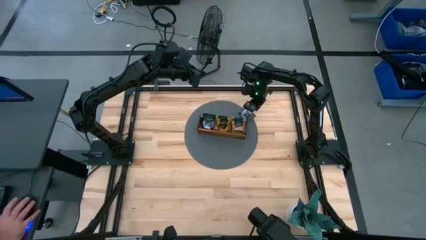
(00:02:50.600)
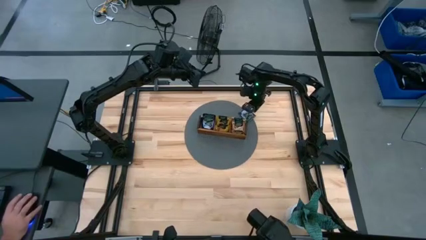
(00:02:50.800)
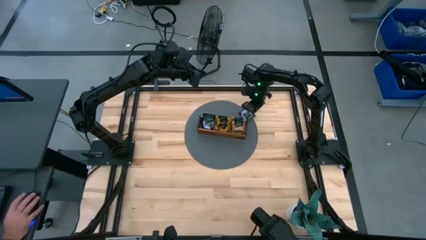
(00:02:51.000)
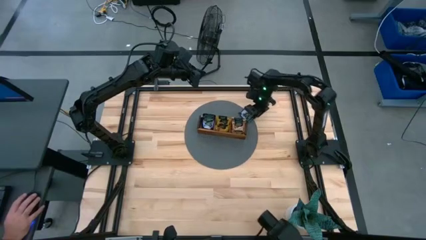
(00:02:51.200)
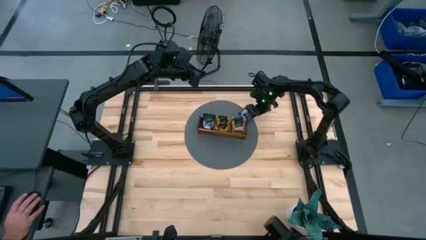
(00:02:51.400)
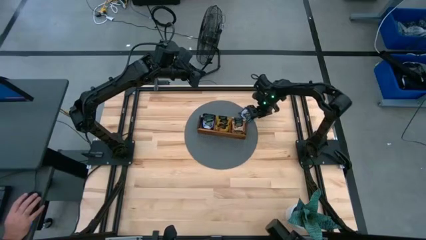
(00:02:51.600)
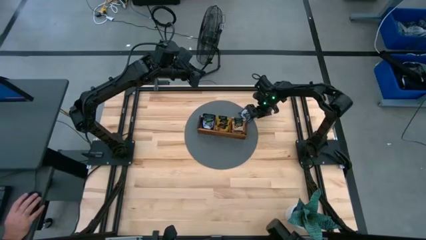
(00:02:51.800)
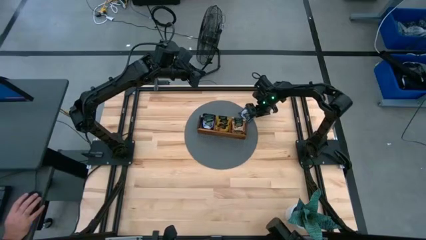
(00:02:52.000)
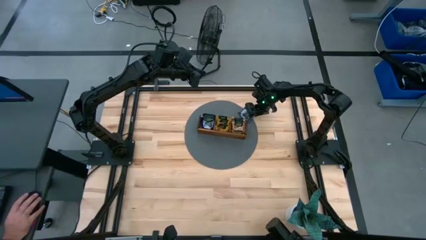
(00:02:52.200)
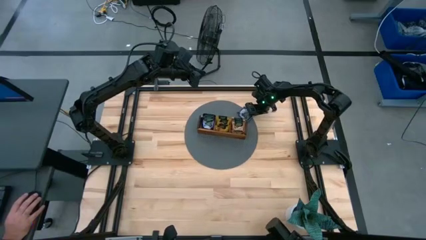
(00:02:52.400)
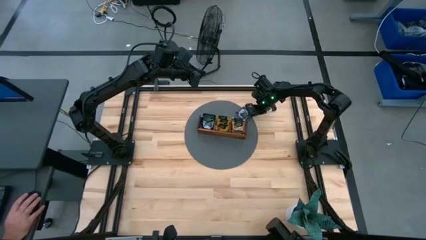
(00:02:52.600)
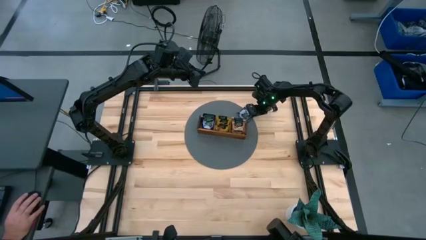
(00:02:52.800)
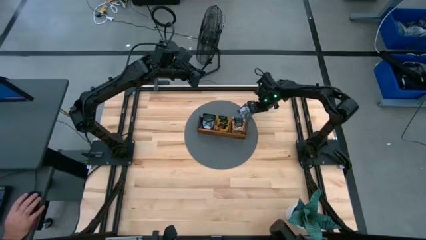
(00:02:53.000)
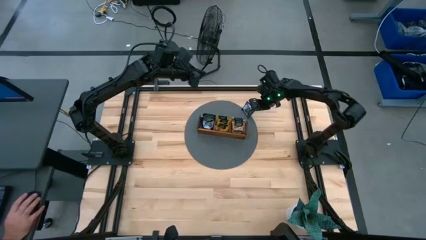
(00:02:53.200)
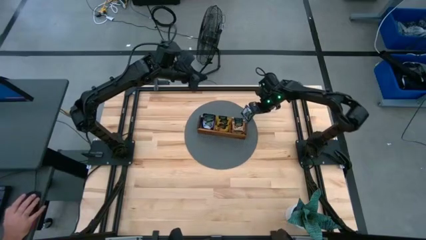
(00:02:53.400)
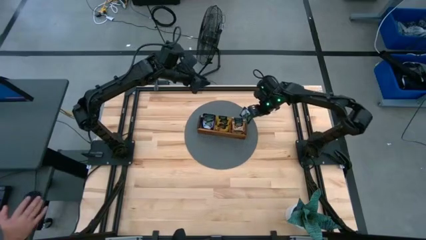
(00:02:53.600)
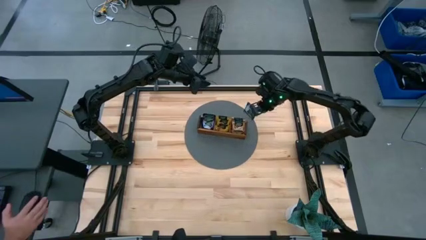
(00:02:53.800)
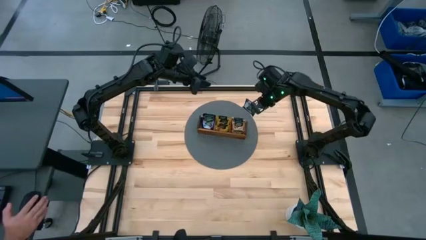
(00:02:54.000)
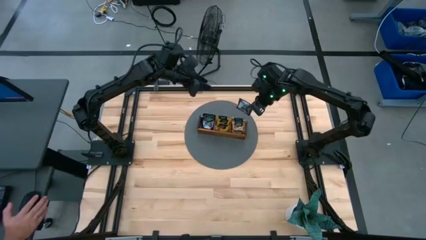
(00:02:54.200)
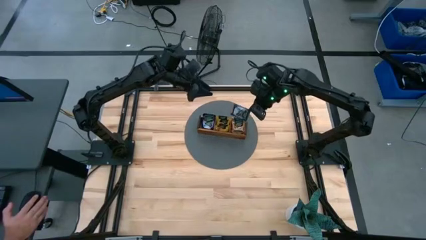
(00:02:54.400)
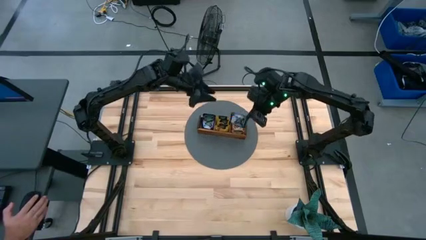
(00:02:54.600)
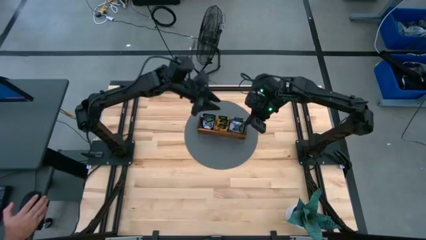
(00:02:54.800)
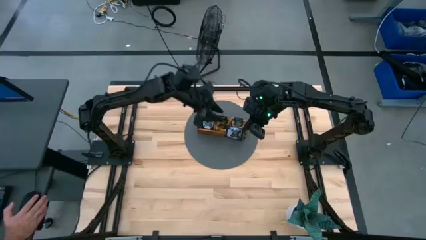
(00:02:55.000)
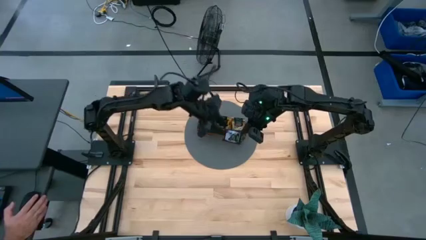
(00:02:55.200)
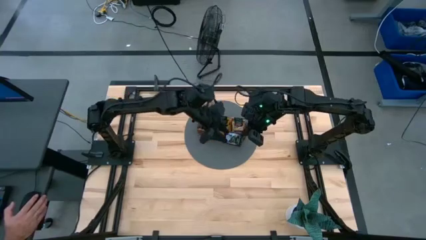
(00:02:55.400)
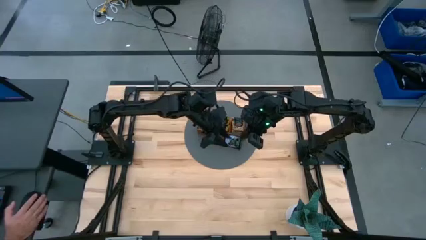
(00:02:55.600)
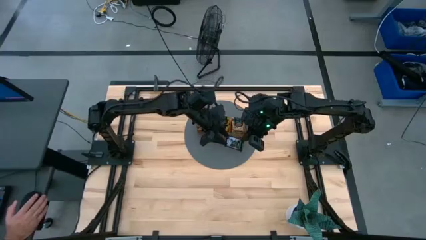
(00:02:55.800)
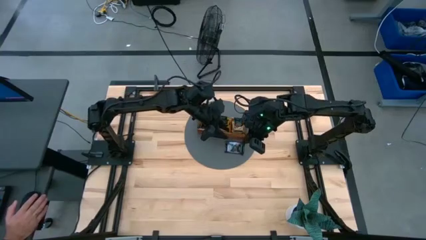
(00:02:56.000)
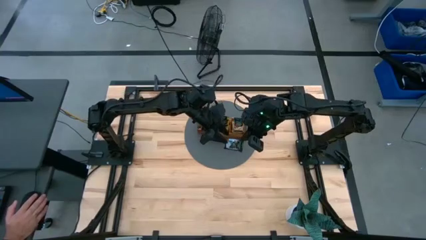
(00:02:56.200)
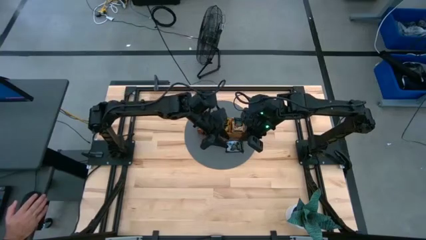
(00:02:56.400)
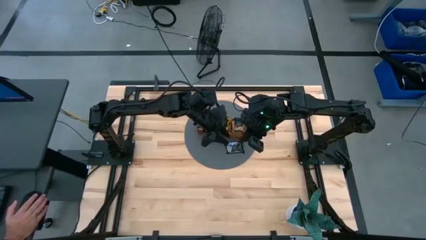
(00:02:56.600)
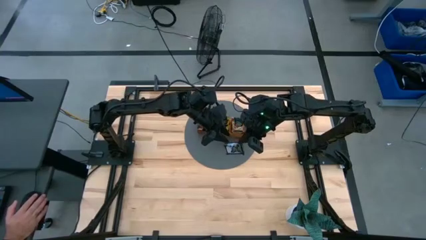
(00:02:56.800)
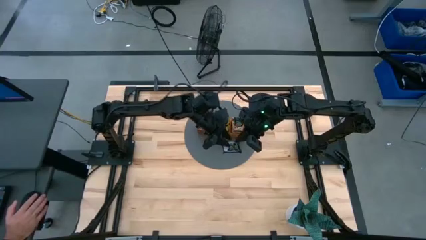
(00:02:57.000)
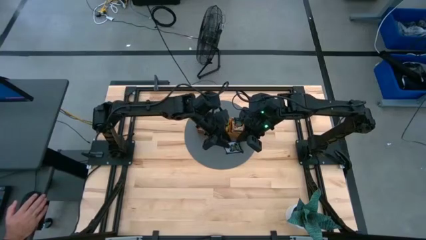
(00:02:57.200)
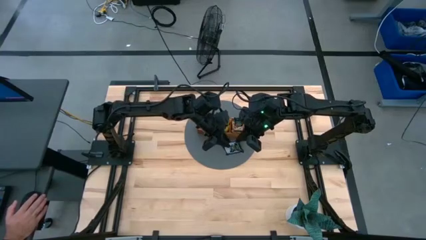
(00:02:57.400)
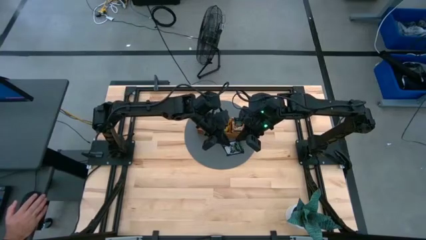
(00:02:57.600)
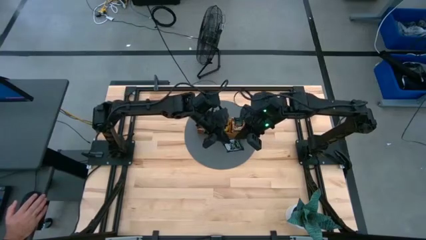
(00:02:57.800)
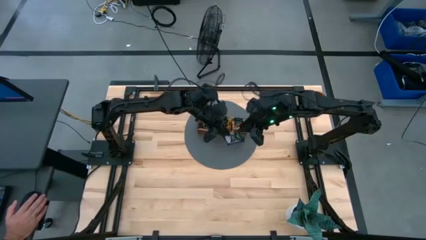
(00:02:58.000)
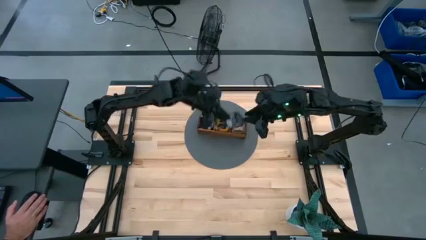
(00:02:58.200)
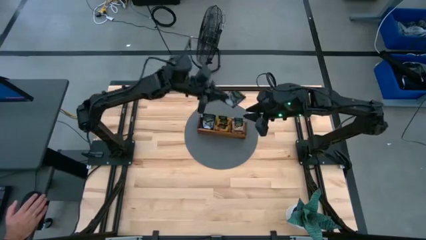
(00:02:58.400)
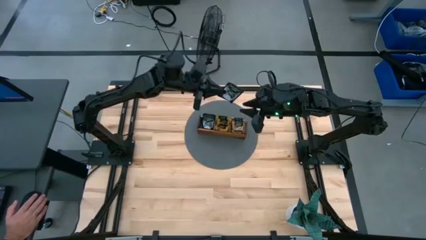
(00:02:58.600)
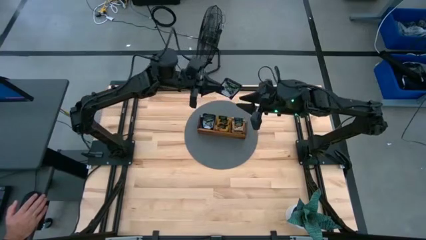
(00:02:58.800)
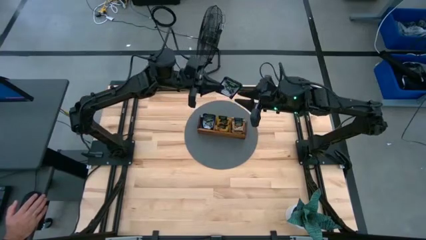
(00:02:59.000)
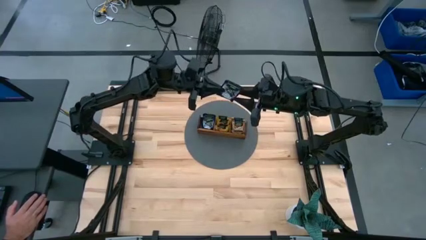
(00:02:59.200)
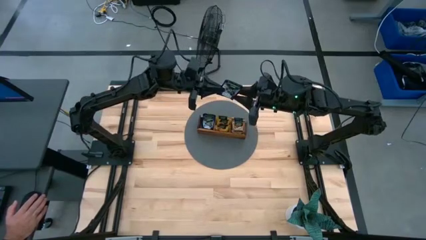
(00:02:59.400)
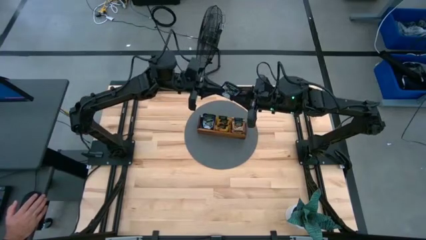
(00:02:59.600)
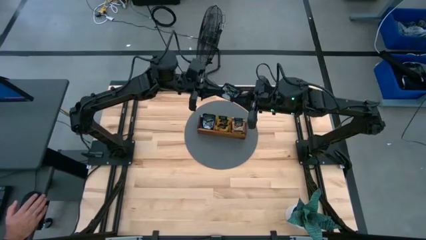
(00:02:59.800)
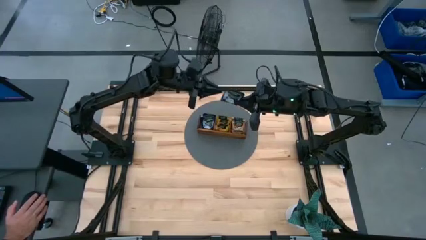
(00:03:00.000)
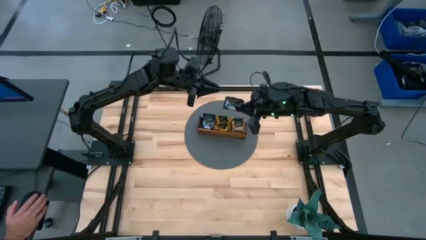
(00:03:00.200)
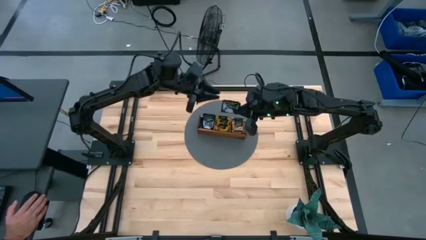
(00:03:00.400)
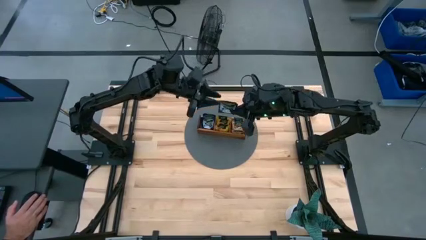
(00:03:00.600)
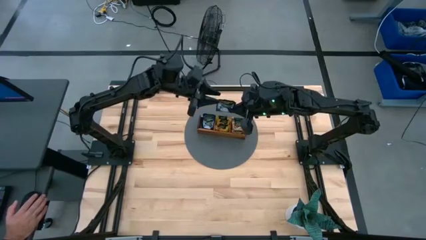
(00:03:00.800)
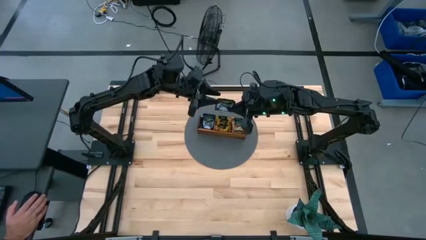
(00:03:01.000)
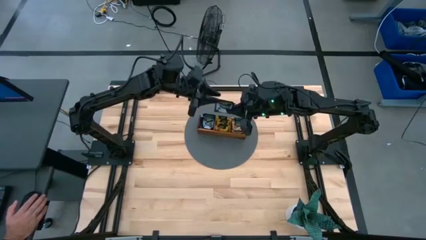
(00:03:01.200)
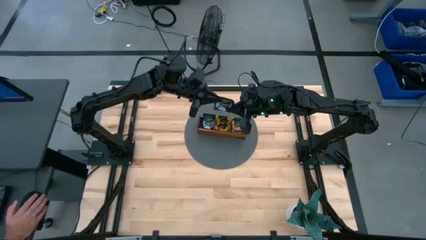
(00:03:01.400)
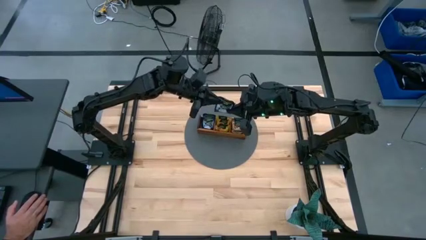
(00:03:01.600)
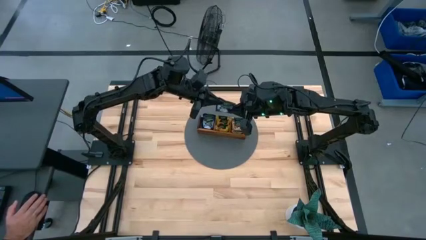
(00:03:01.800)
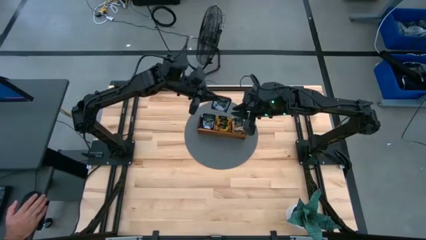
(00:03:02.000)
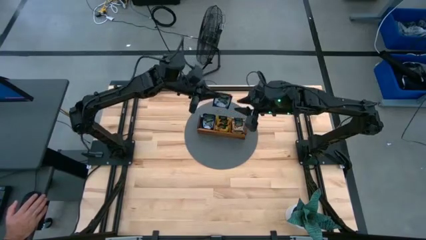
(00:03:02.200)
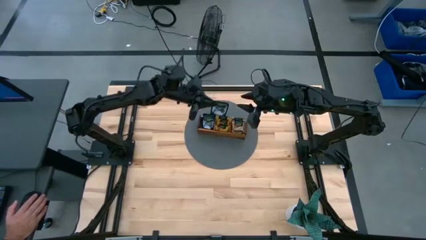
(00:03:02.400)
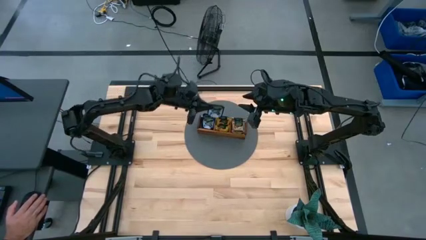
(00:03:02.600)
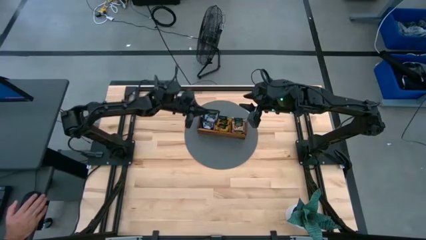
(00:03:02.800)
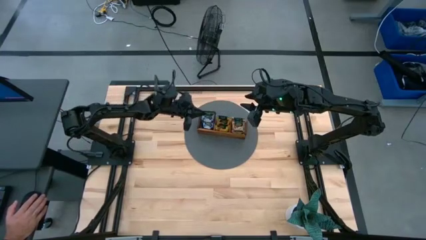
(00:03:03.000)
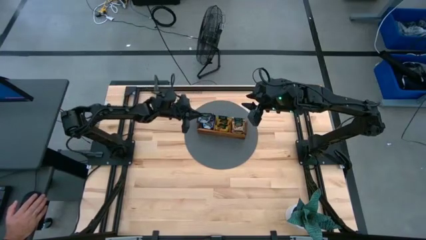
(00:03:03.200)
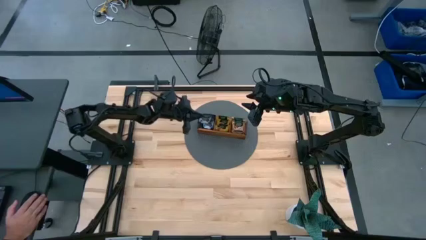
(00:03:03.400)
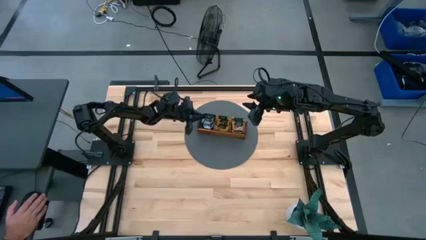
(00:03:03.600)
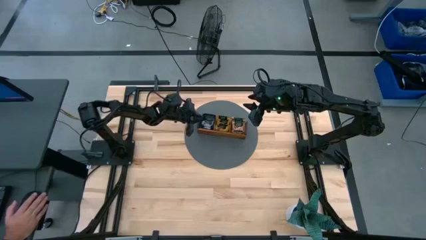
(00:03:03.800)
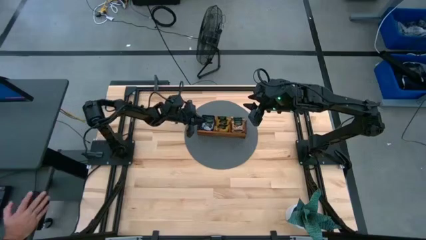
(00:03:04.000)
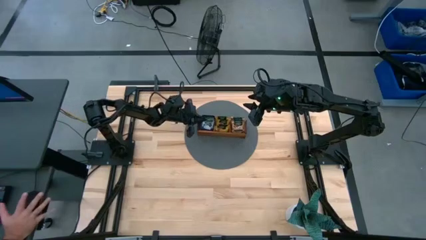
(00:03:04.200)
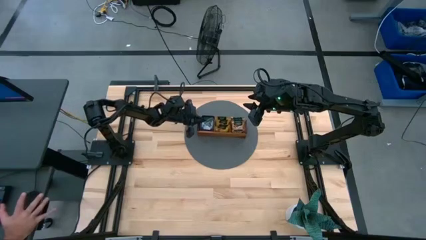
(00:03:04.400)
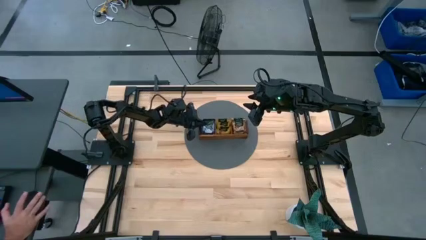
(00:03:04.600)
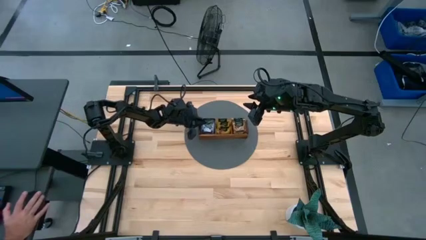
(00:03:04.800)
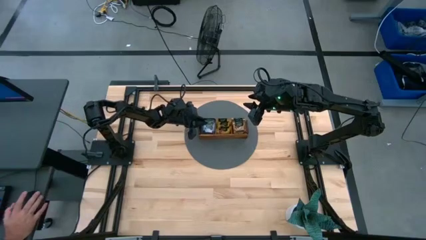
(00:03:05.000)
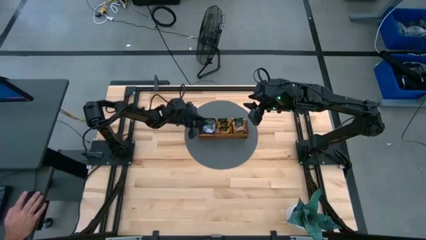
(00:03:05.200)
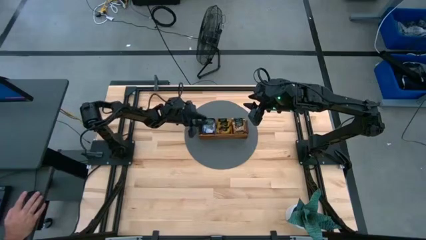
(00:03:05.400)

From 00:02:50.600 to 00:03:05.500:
Task: Pick & Place Tea
Put the violet tea bag into the left section of the wooden organizer
